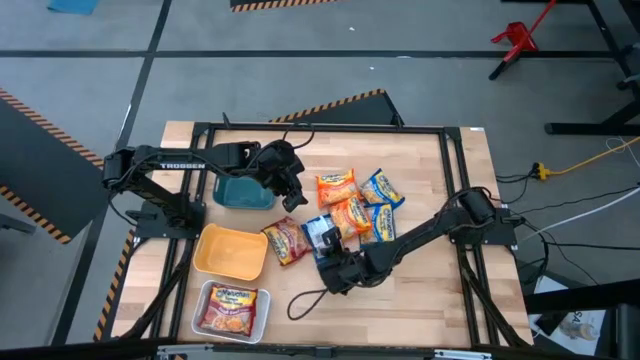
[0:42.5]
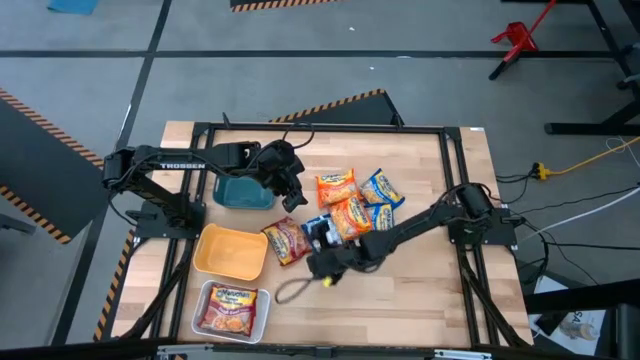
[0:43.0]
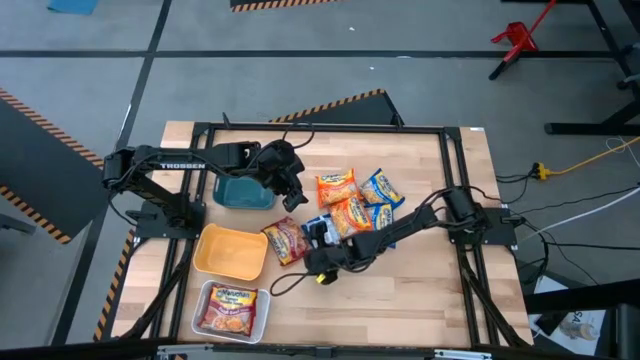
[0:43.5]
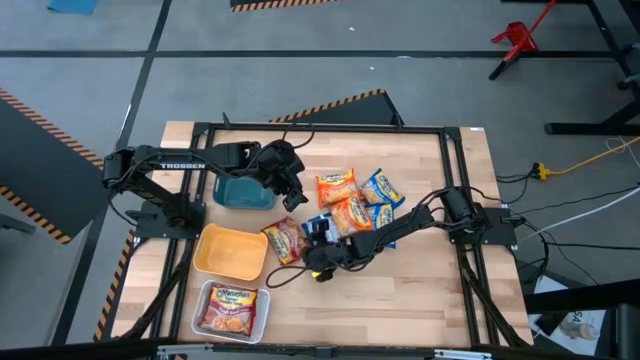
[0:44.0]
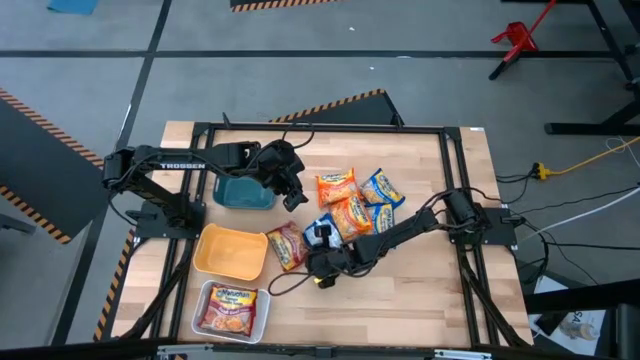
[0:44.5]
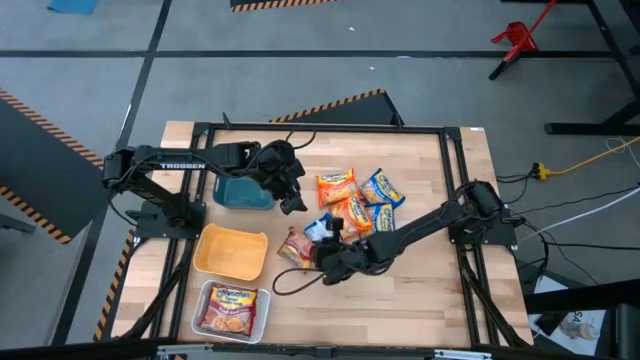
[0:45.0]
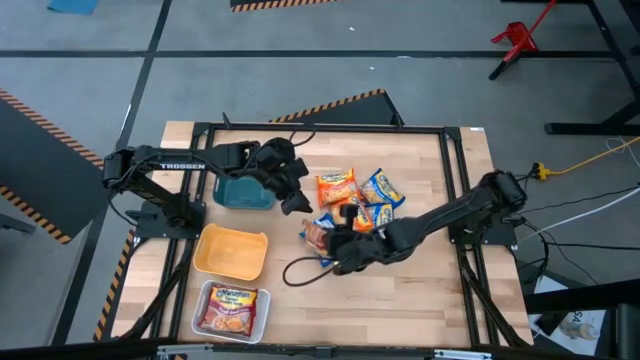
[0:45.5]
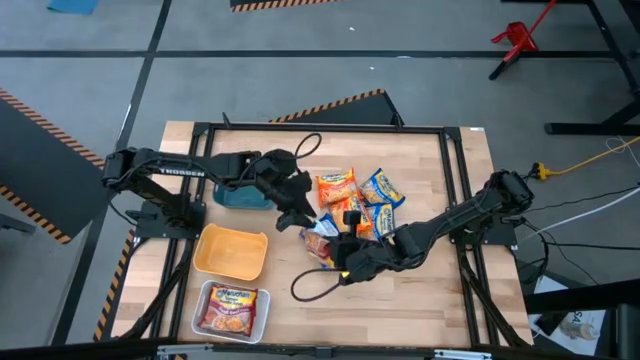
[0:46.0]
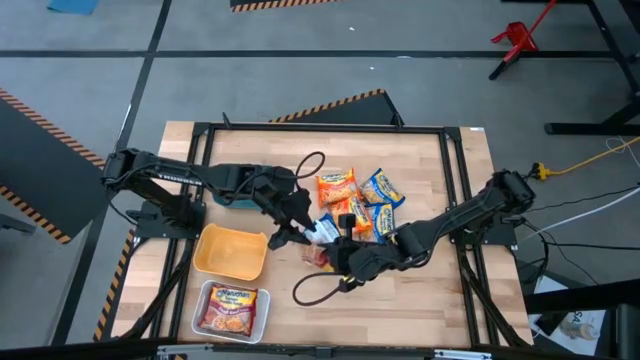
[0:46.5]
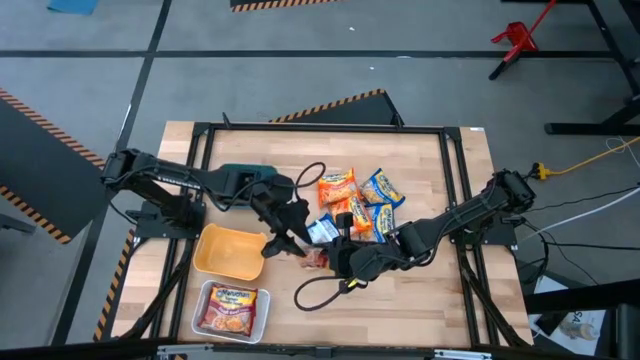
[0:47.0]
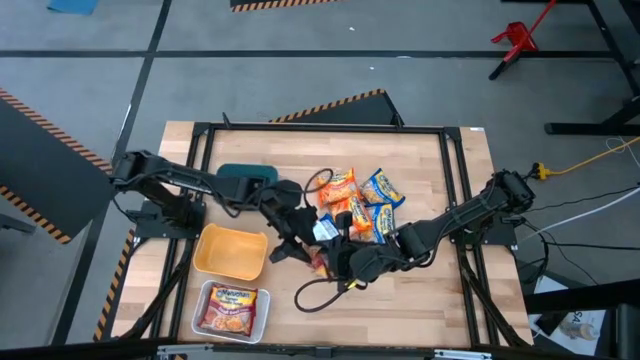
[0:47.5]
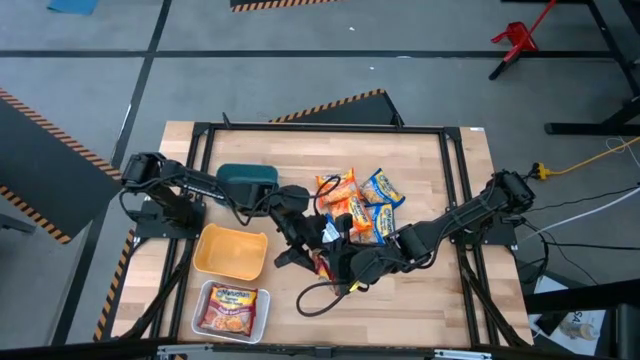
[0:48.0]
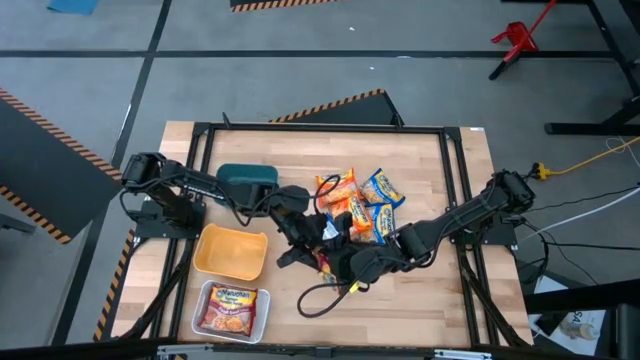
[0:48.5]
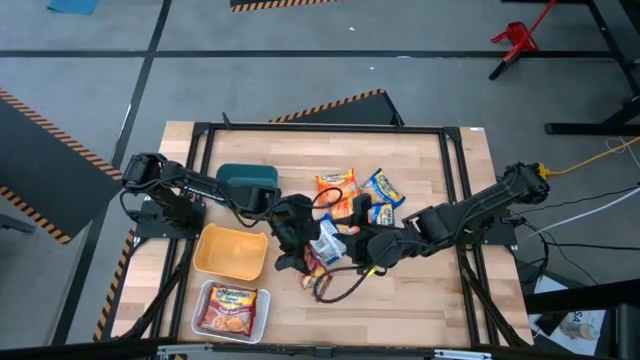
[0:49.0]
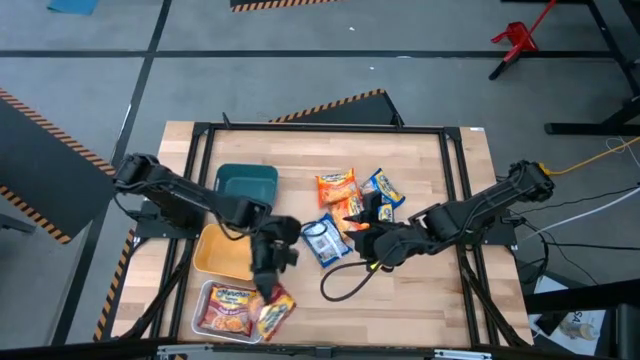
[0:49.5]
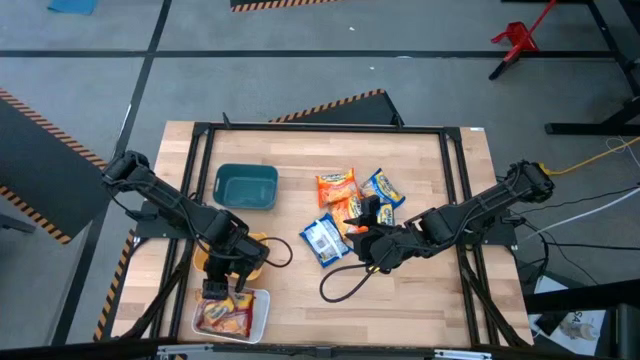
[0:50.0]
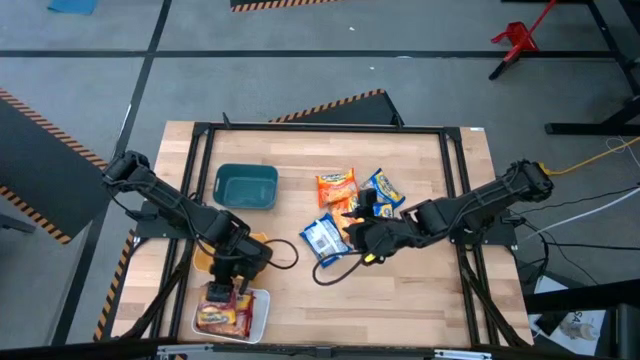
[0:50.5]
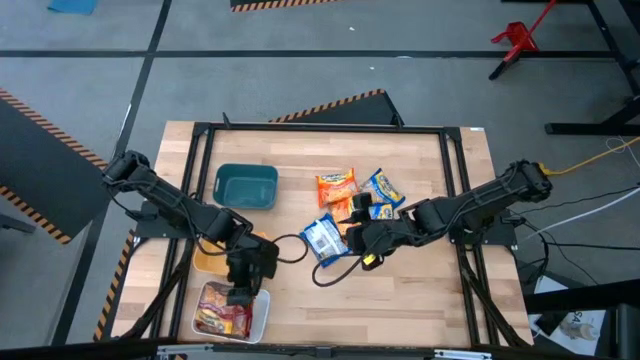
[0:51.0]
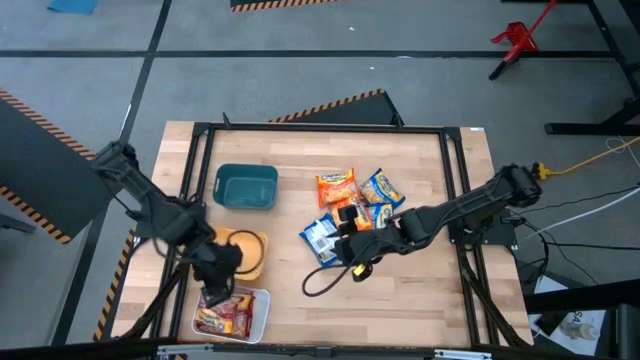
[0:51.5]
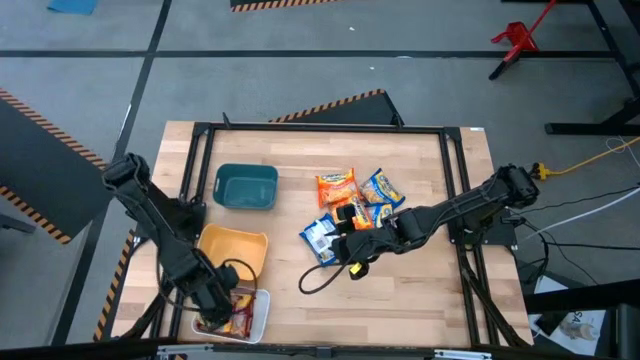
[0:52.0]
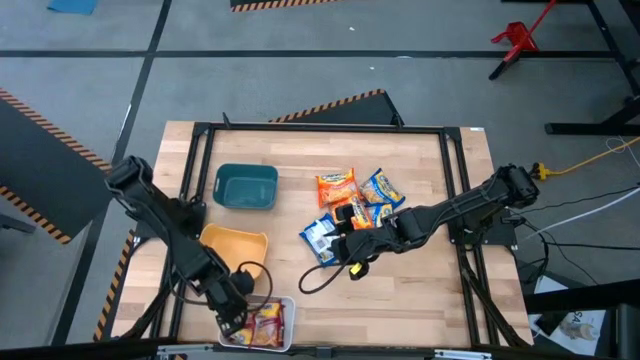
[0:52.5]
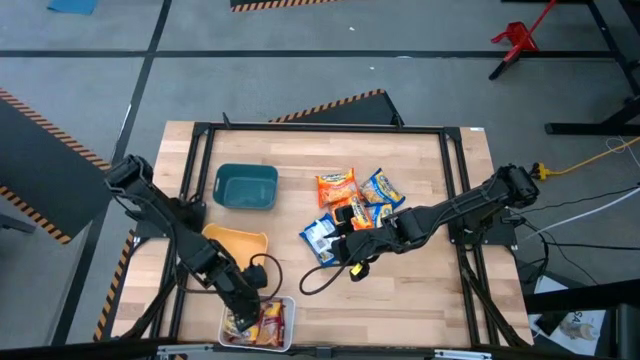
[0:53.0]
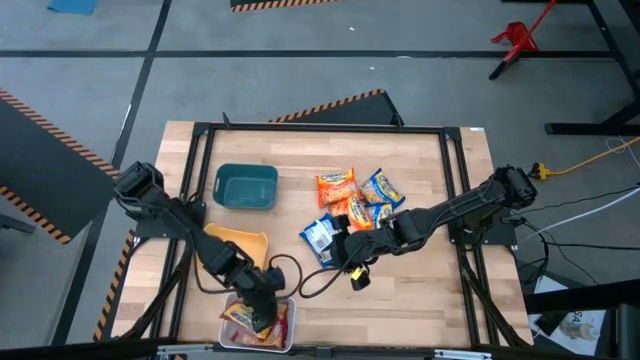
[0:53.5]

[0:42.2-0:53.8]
Task: Sort Maruchan noodles
Put the red noodle pack into the white bin

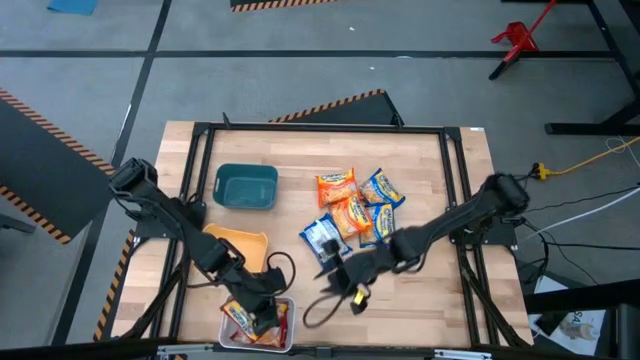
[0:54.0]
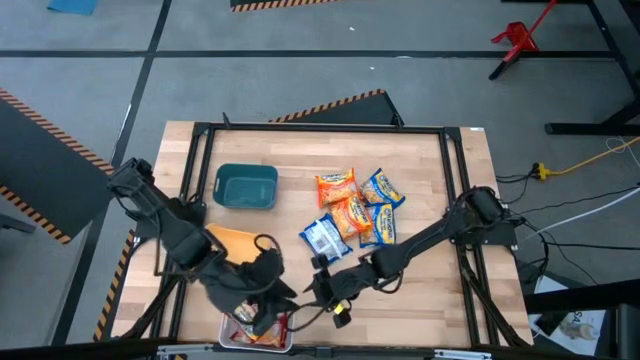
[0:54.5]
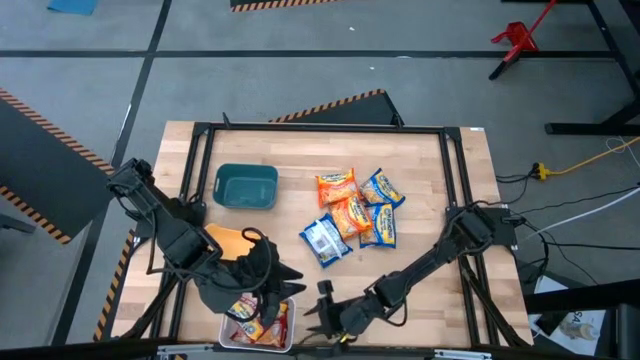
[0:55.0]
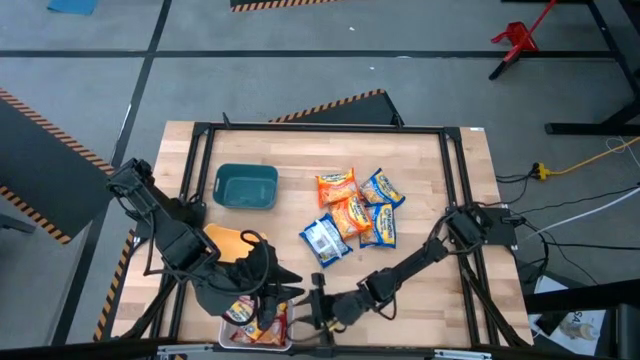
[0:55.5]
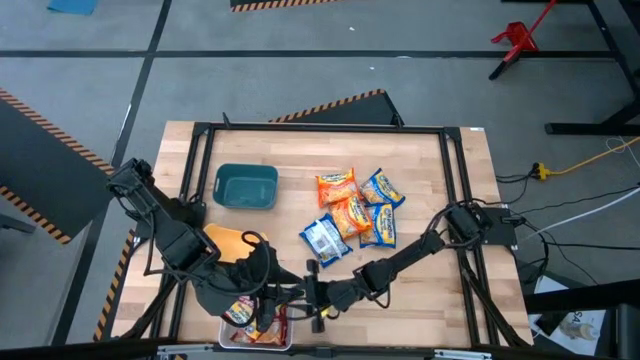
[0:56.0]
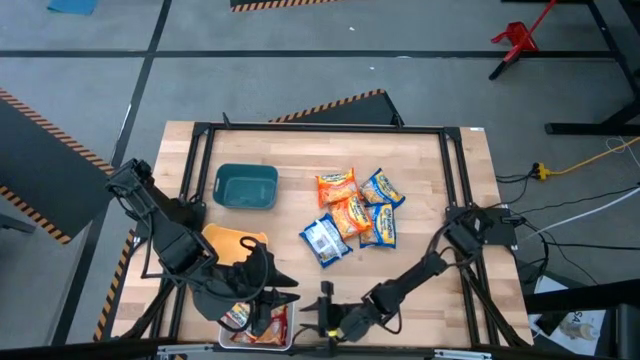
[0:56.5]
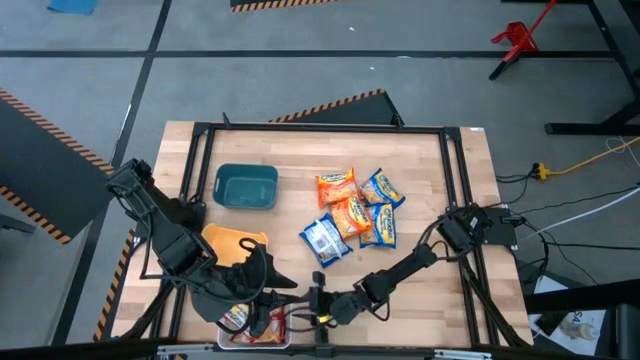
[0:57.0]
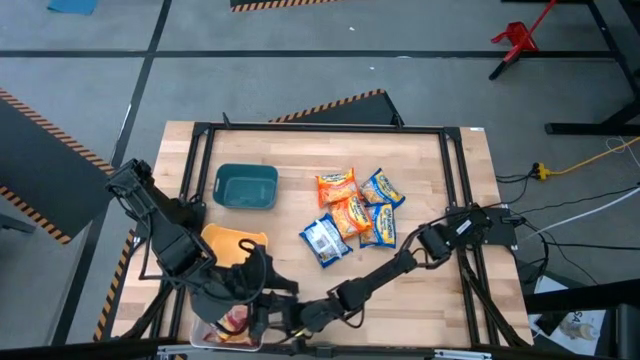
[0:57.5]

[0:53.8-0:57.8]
Adjust the white bin

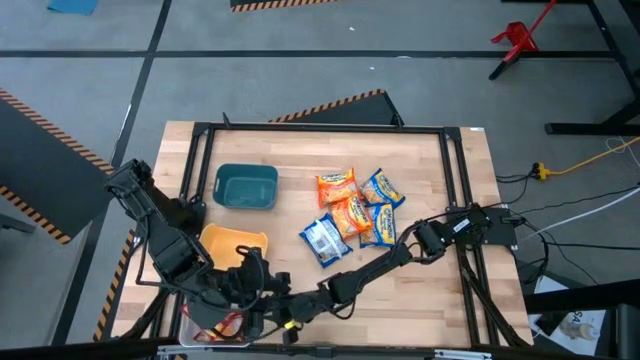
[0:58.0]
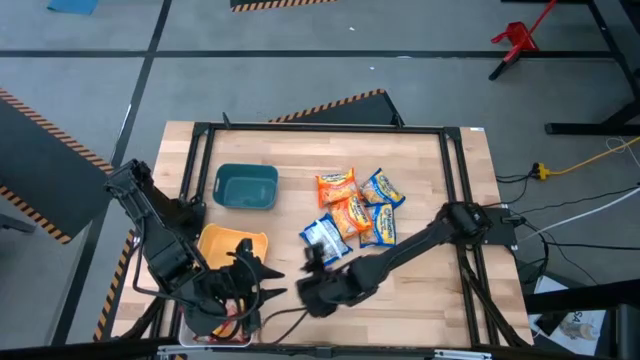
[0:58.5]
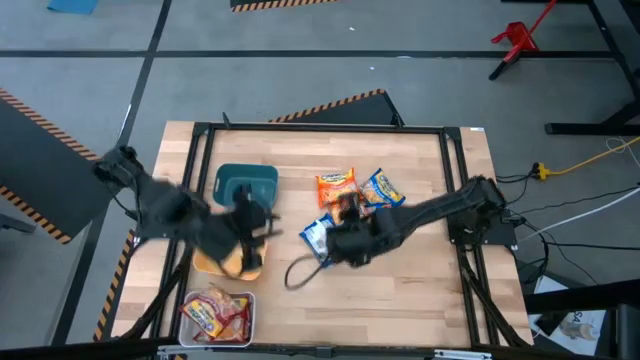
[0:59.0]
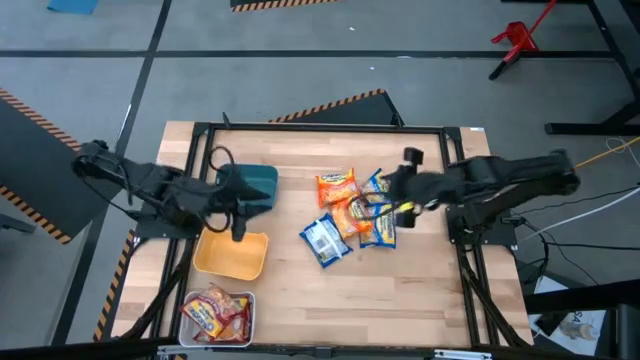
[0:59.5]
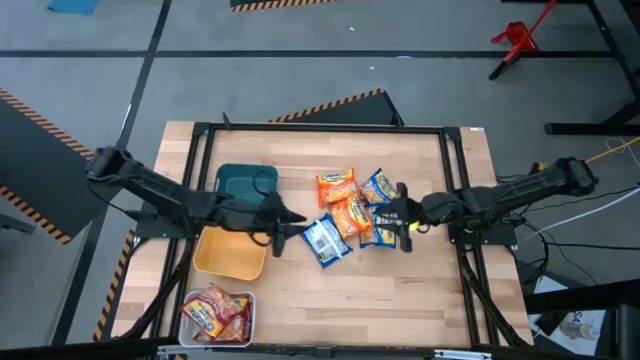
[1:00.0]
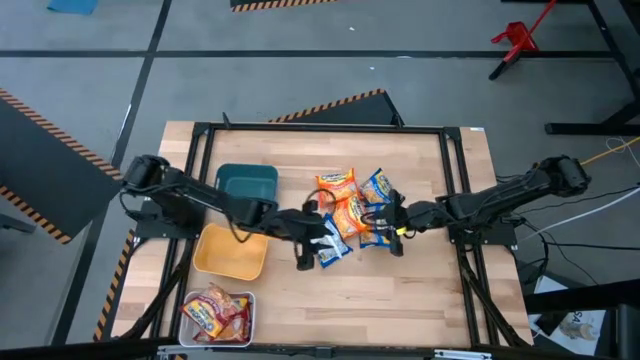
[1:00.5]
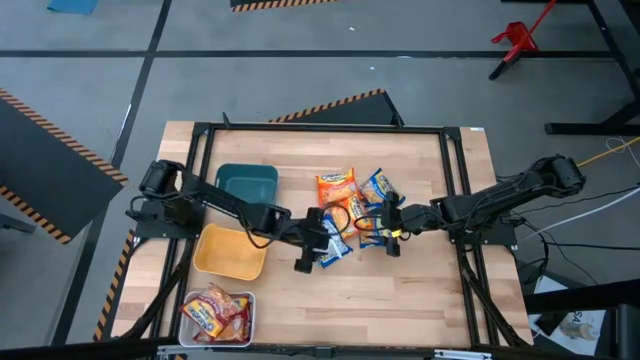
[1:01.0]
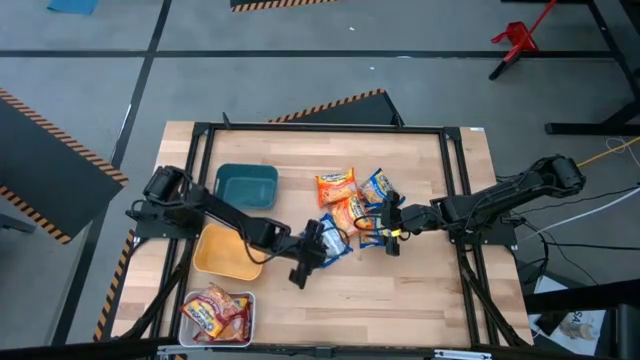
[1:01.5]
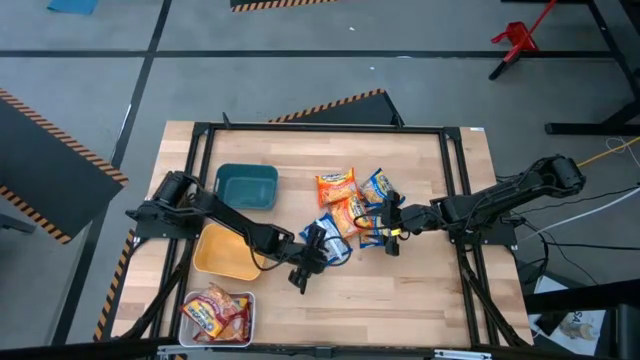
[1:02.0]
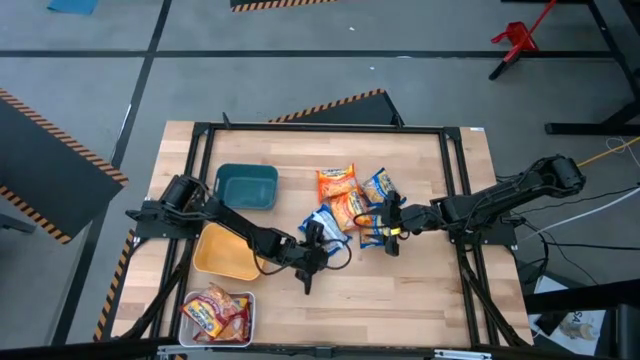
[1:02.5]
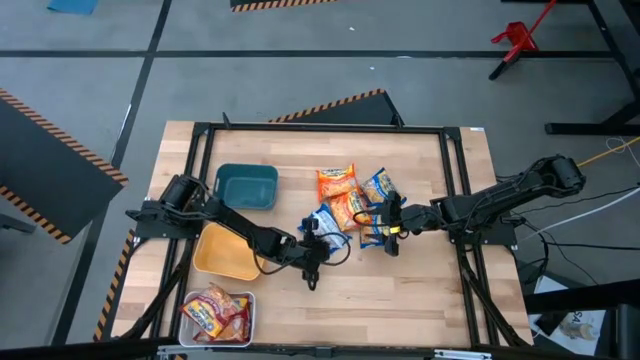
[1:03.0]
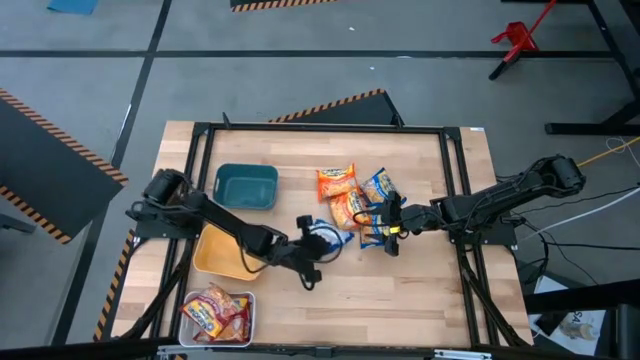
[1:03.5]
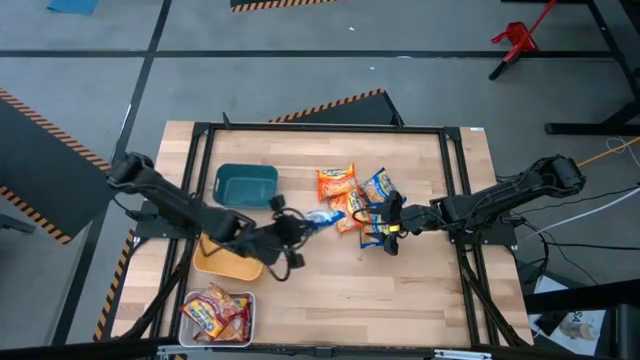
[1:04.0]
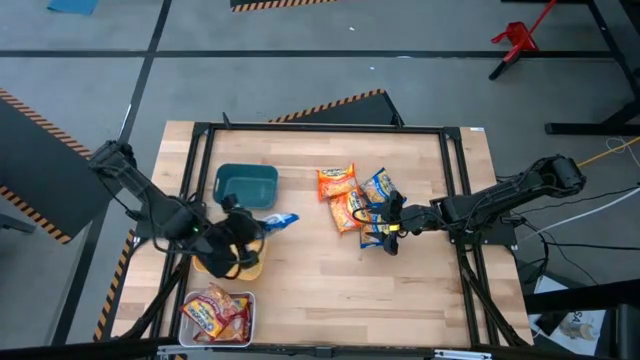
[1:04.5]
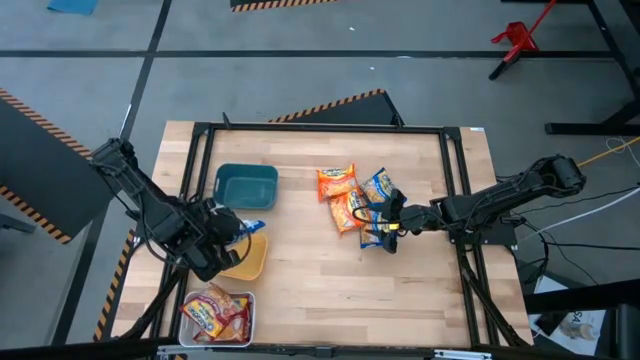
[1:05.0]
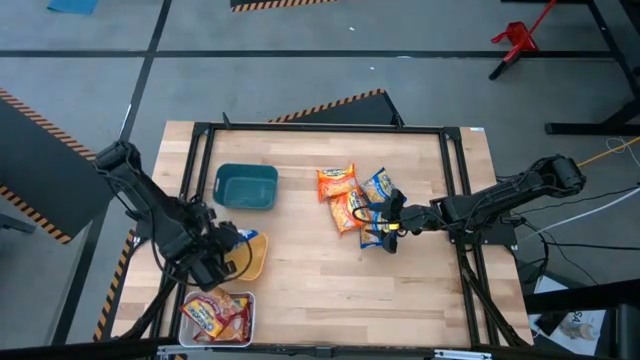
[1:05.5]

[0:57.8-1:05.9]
Put the bottom left blue noodle pack into the yellow bin
